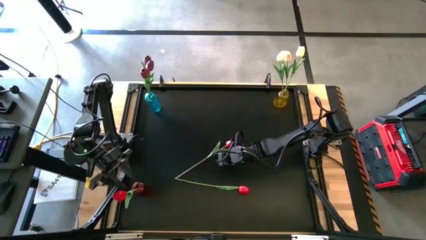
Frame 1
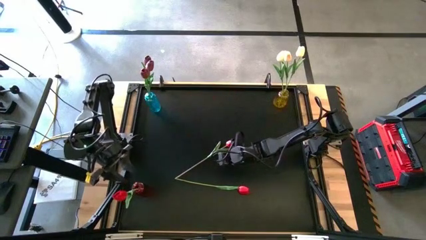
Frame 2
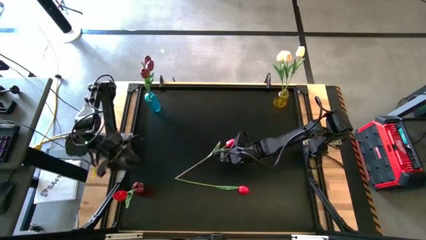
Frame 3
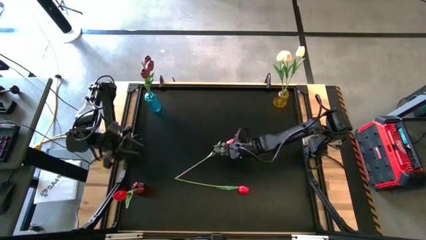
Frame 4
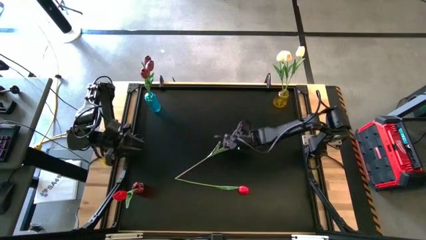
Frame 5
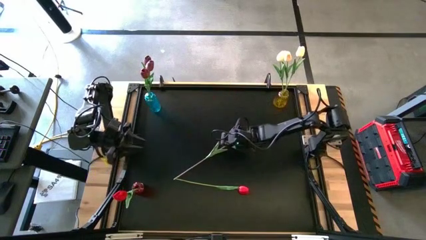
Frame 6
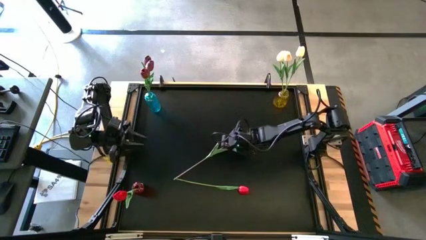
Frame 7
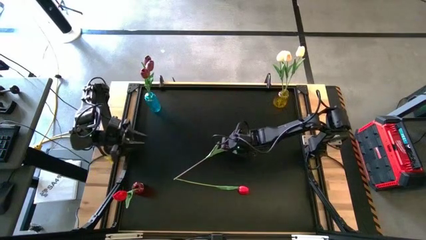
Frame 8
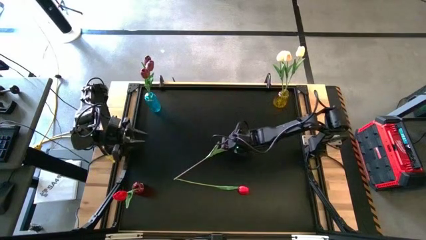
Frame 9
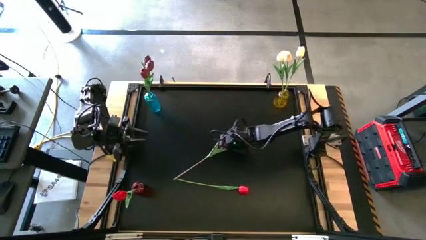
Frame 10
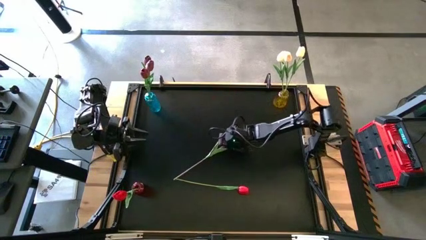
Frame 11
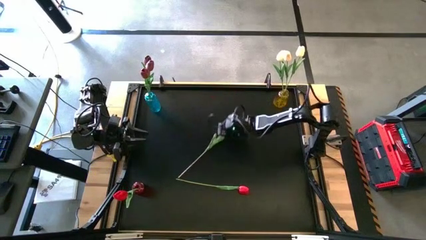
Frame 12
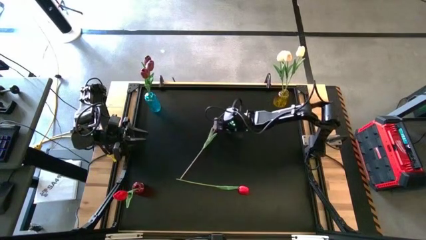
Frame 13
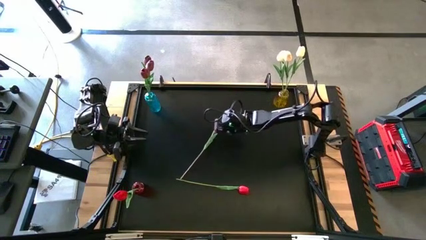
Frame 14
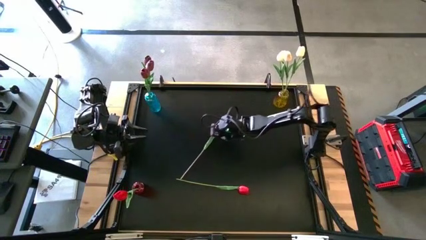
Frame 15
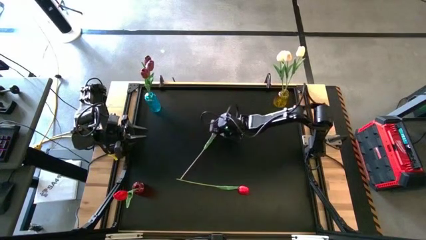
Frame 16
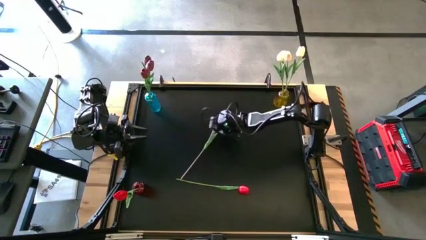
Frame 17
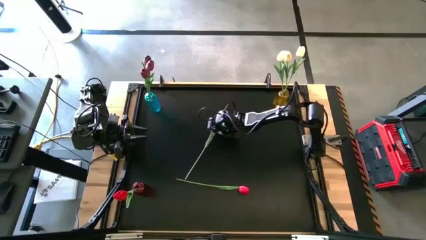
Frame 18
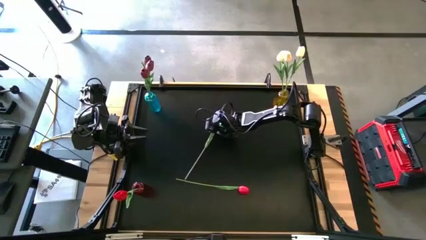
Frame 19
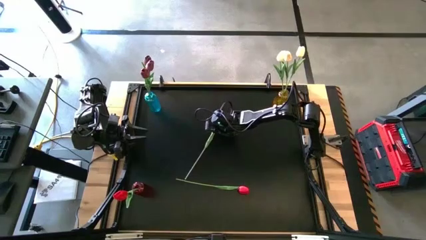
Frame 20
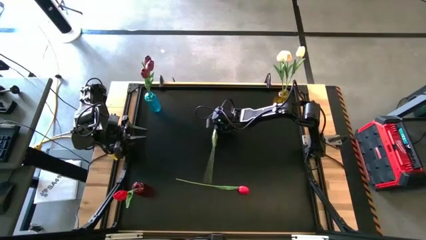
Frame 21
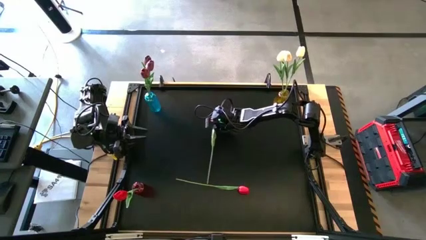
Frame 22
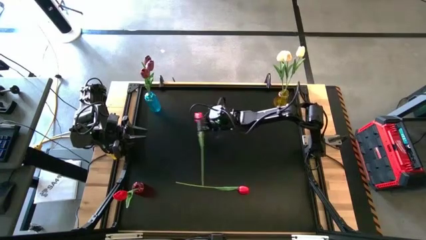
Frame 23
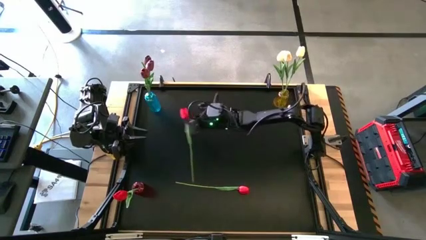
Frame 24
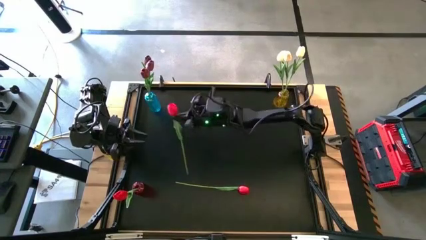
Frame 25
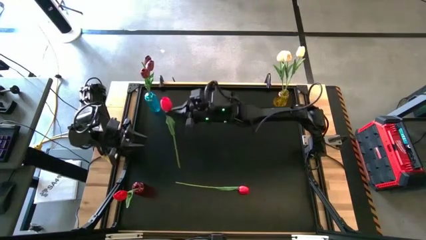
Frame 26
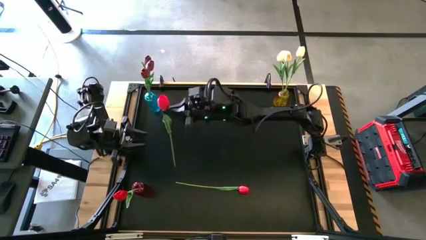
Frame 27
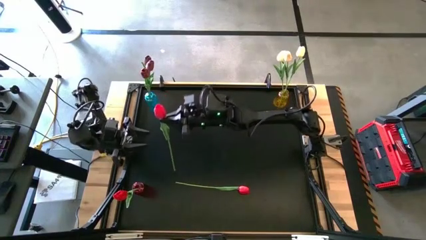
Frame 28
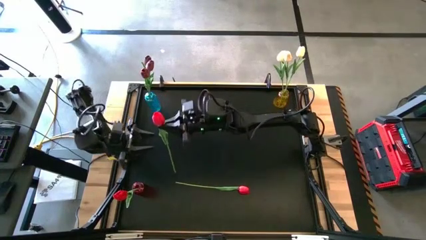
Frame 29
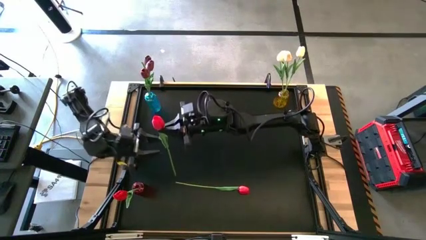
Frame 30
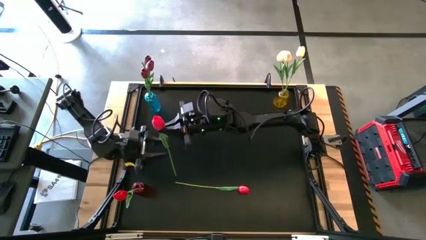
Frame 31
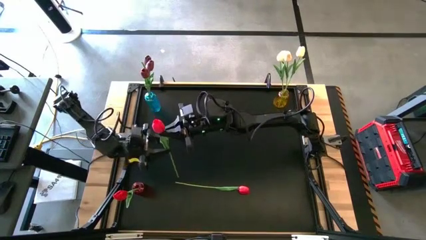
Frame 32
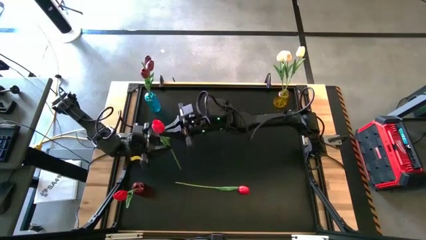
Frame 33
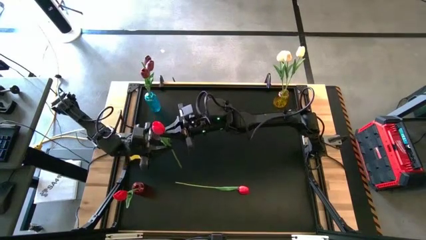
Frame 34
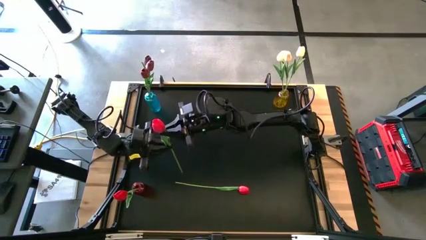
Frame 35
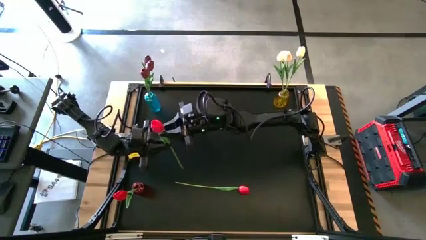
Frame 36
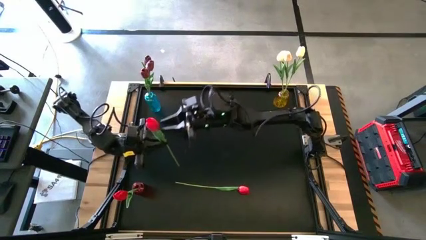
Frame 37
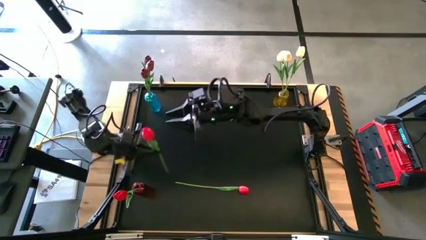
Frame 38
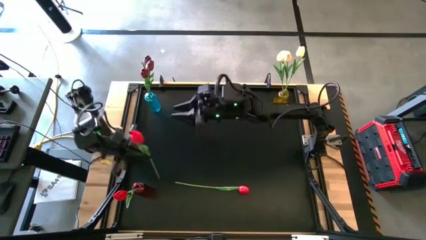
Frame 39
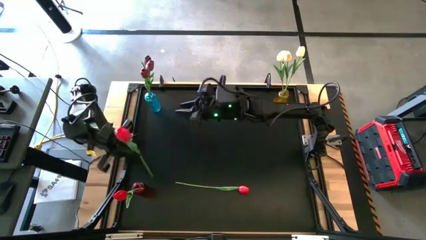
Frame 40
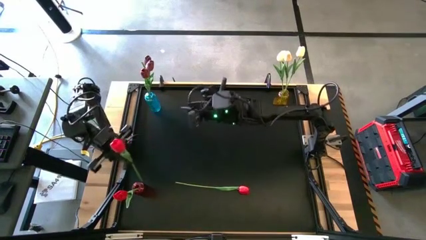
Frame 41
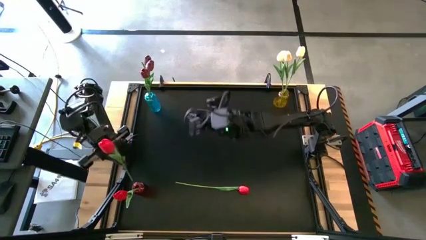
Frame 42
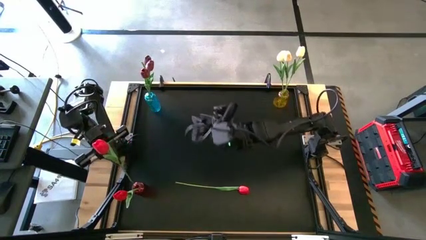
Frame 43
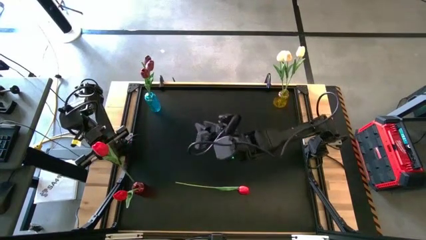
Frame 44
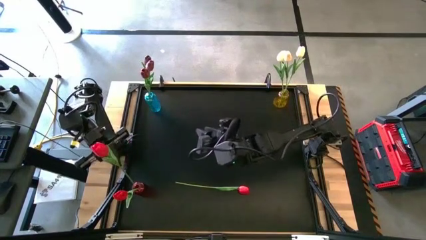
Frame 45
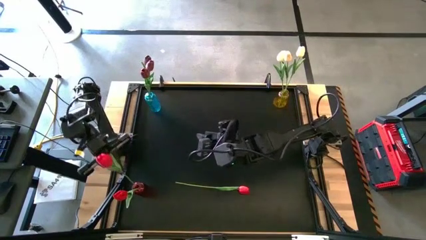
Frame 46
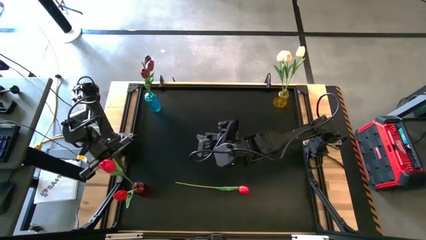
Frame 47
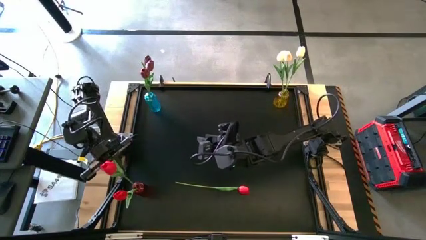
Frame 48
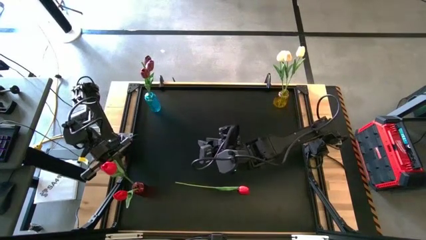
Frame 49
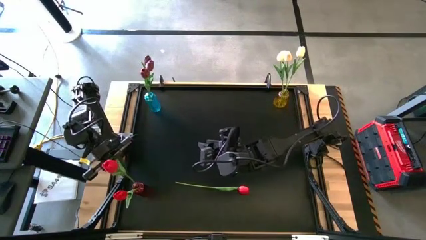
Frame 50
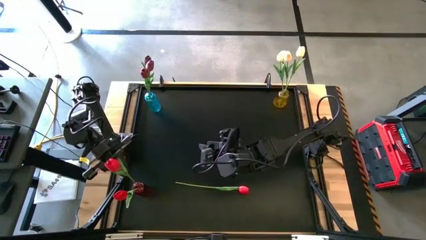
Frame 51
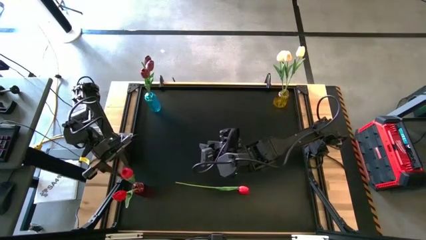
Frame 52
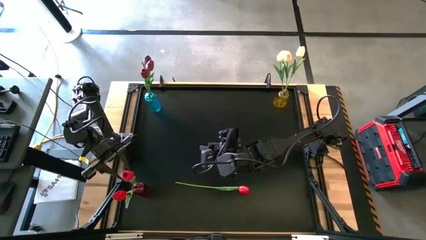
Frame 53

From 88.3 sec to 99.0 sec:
Task: Sort flowers into vase by color
Put the center red flower into the red vase

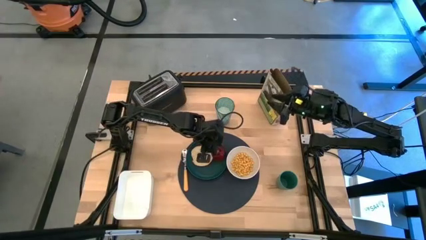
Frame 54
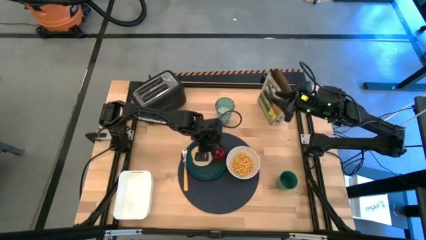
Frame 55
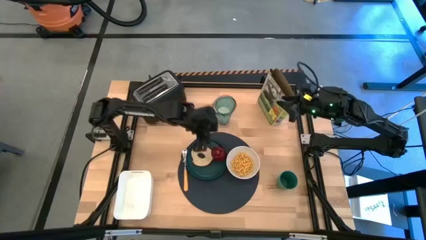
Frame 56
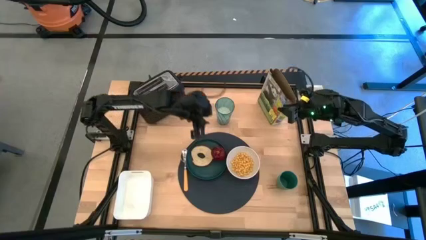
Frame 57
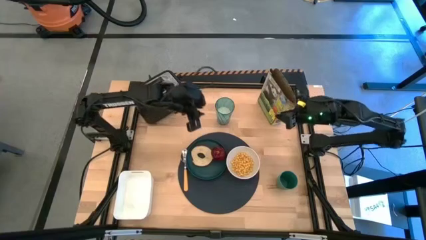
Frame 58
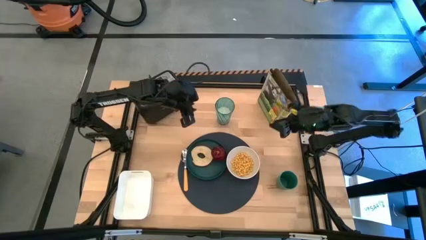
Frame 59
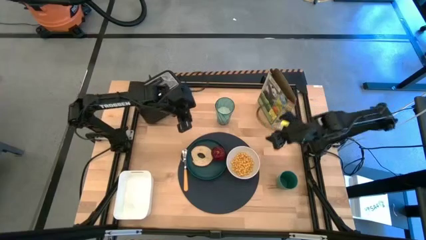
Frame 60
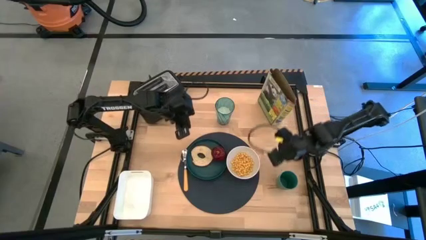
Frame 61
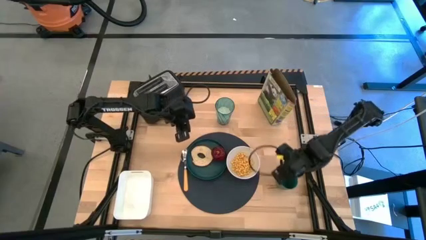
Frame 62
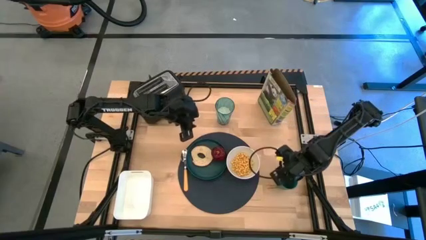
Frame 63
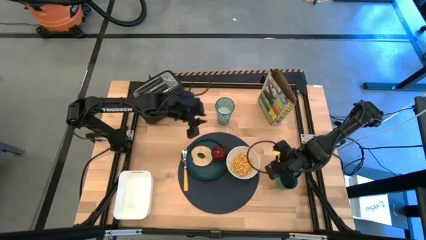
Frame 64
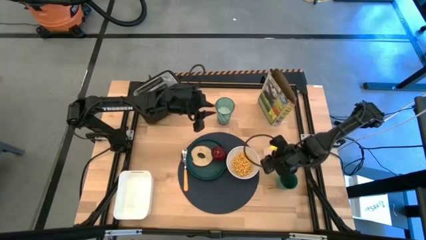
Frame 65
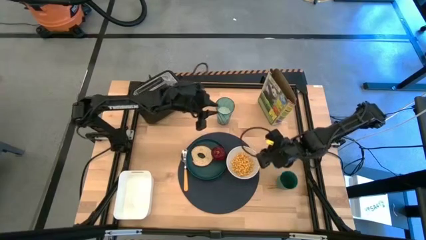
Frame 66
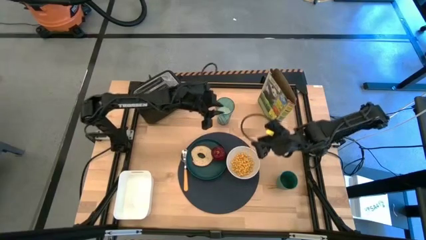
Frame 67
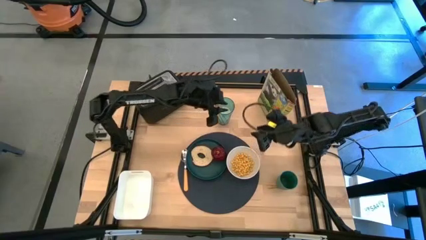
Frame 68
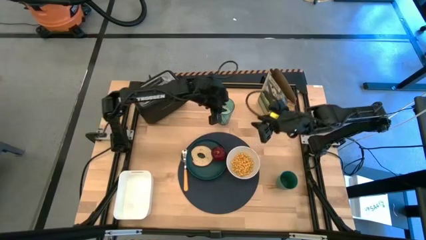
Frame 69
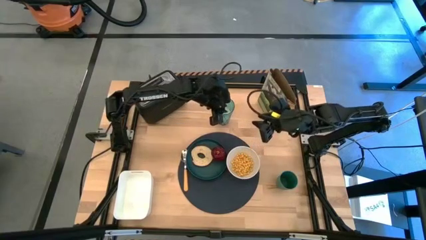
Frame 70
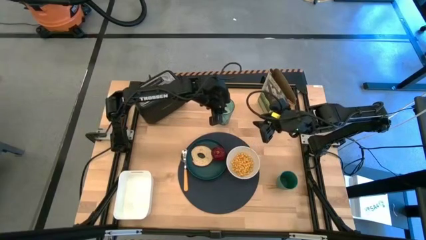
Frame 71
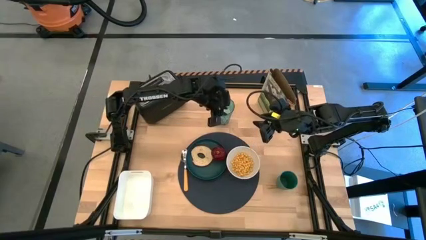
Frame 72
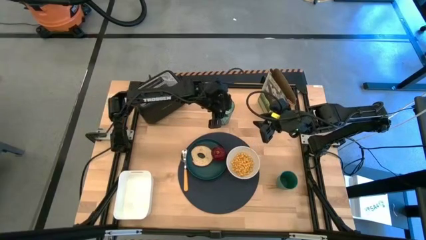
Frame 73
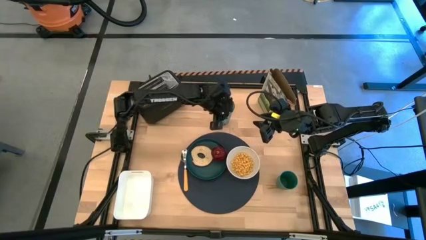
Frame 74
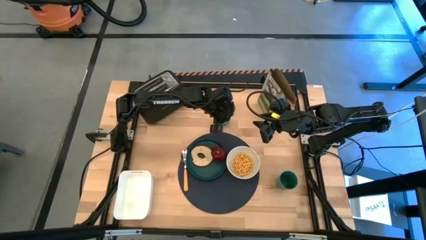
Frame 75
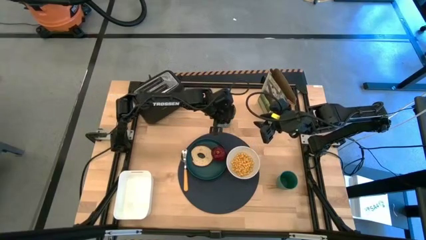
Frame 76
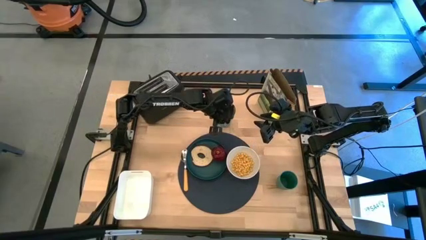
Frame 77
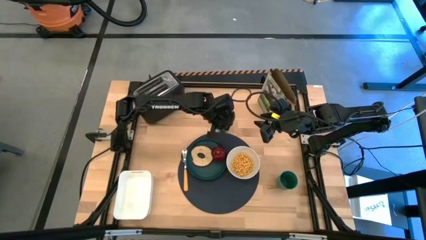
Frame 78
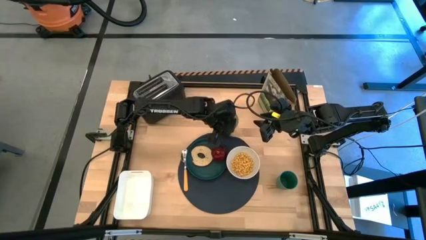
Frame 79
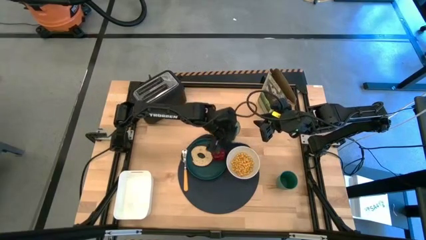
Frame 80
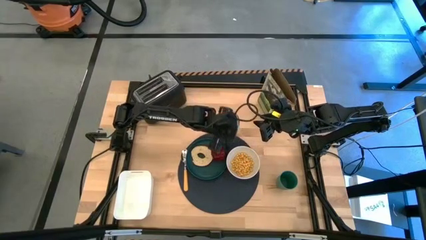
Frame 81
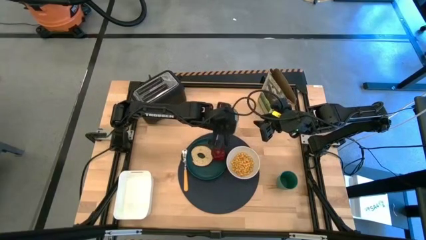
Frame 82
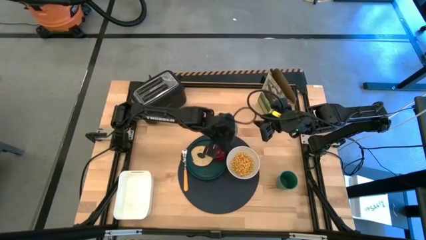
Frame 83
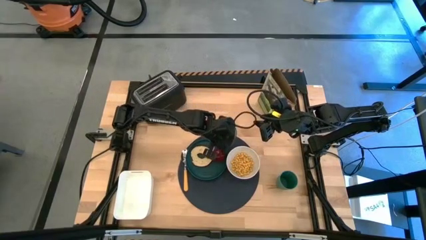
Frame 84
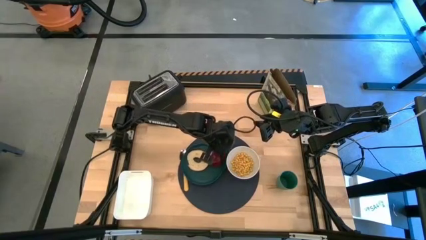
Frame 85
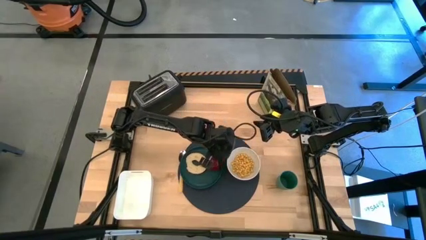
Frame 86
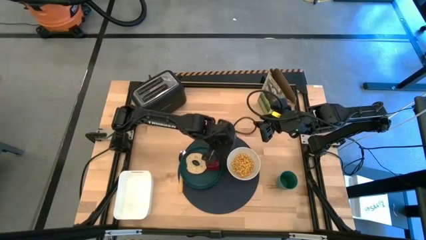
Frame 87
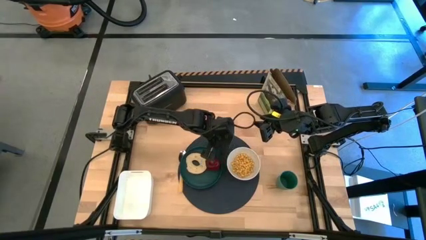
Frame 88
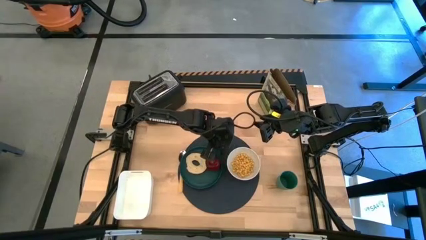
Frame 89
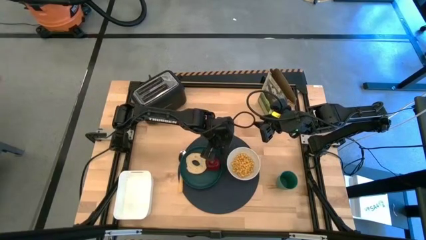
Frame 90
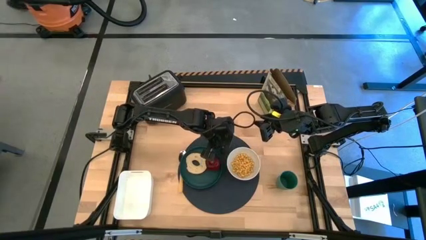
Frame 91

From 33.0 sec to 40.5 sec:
Task: Arrange a breakfast setting
Put the blue glass on the top center of the mat
